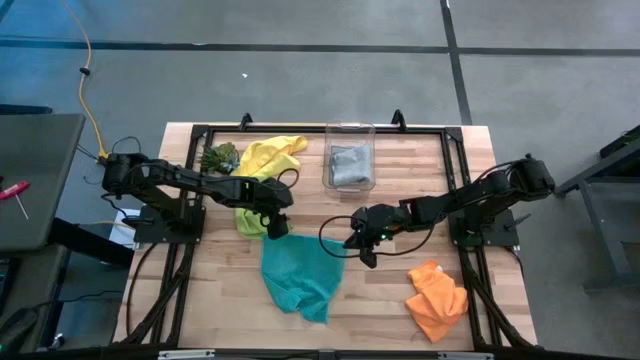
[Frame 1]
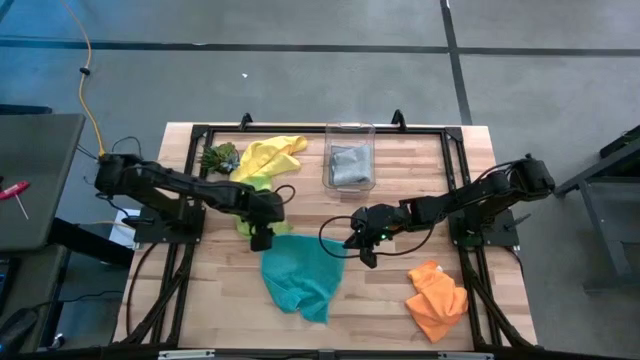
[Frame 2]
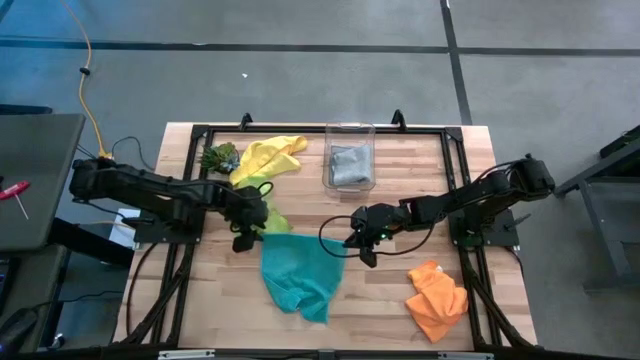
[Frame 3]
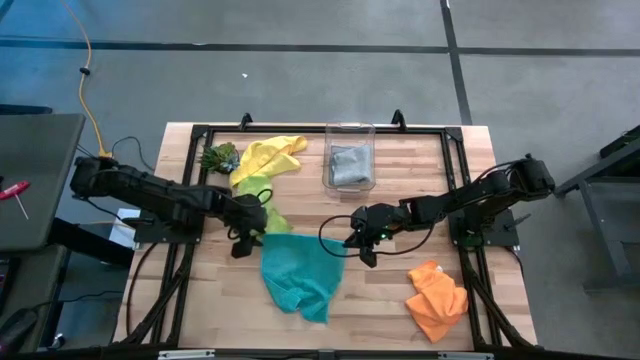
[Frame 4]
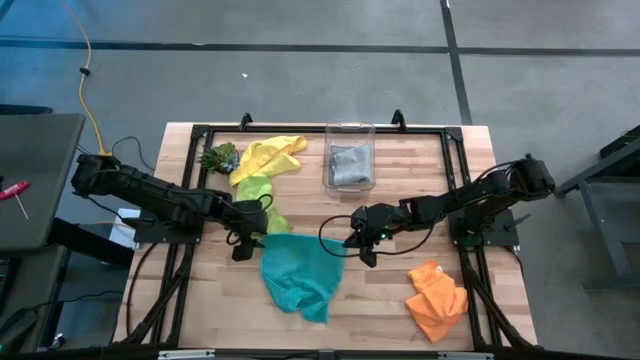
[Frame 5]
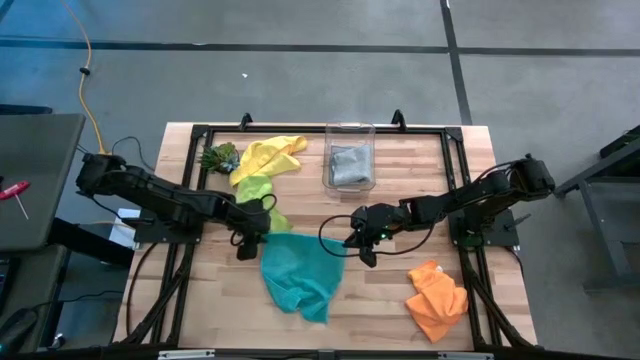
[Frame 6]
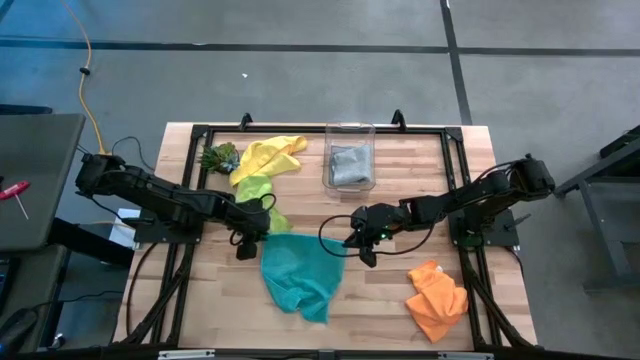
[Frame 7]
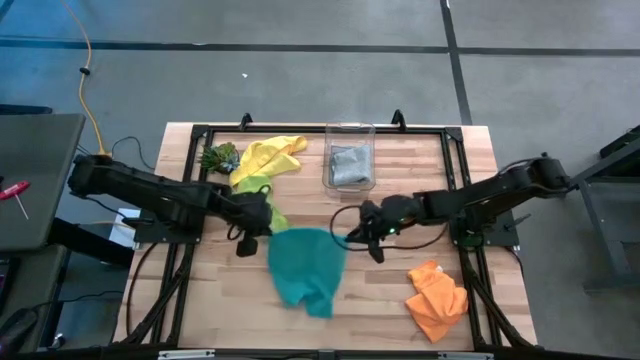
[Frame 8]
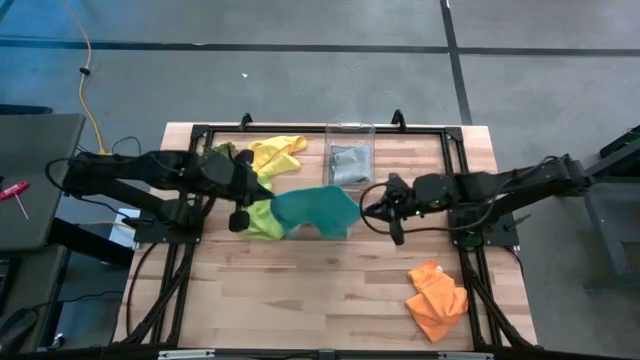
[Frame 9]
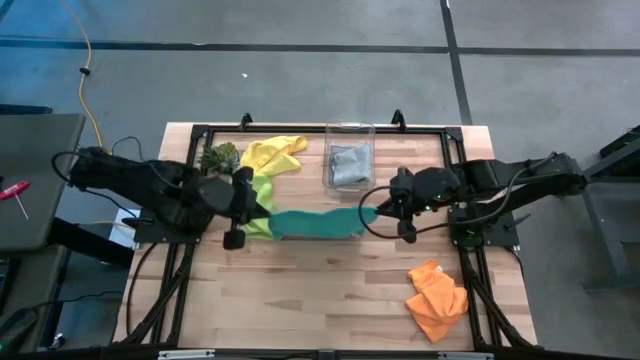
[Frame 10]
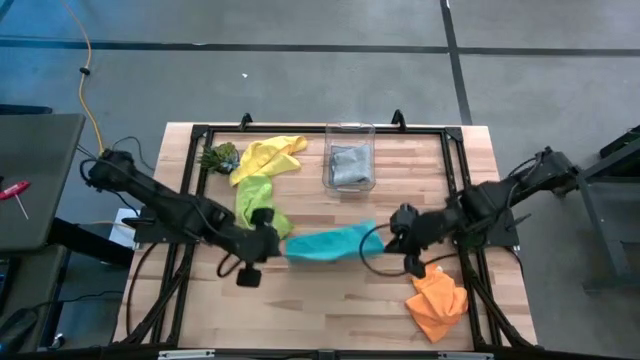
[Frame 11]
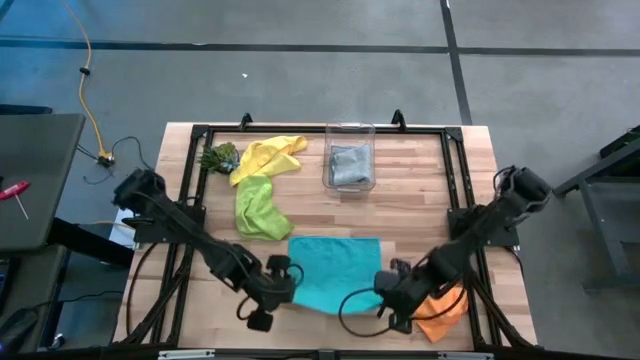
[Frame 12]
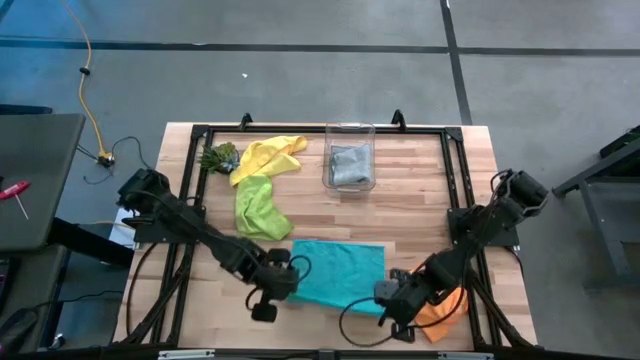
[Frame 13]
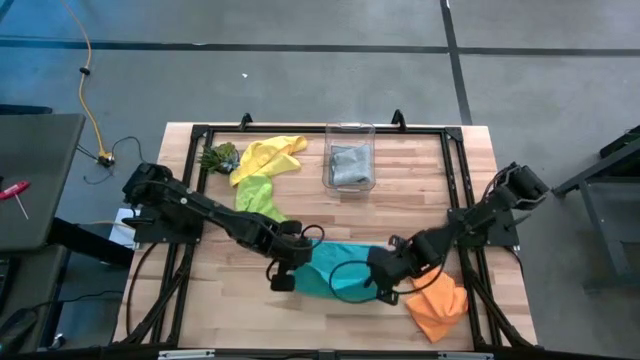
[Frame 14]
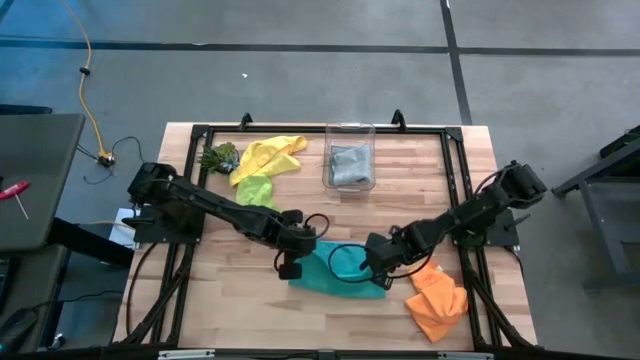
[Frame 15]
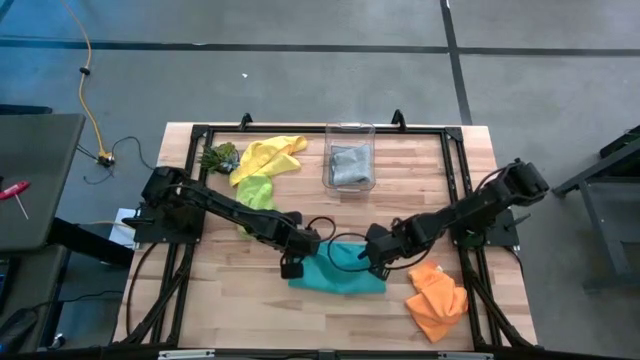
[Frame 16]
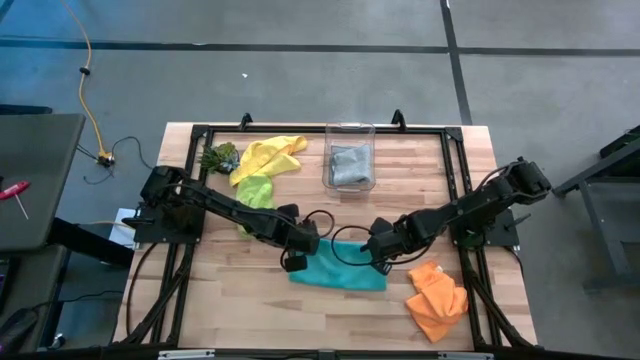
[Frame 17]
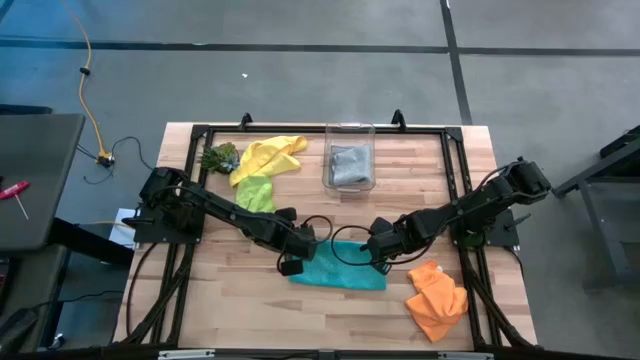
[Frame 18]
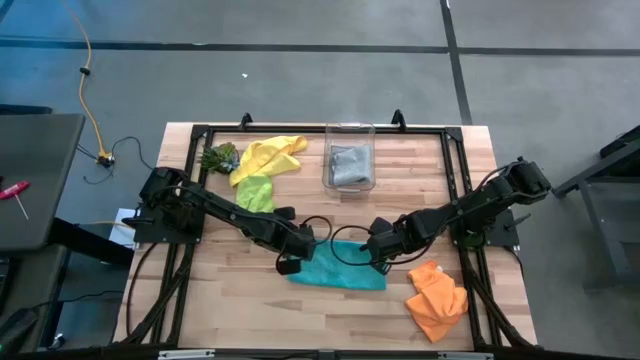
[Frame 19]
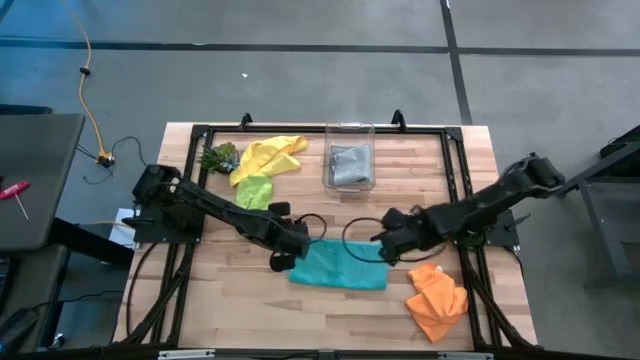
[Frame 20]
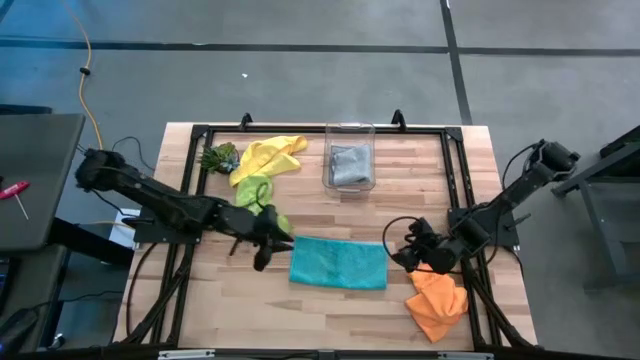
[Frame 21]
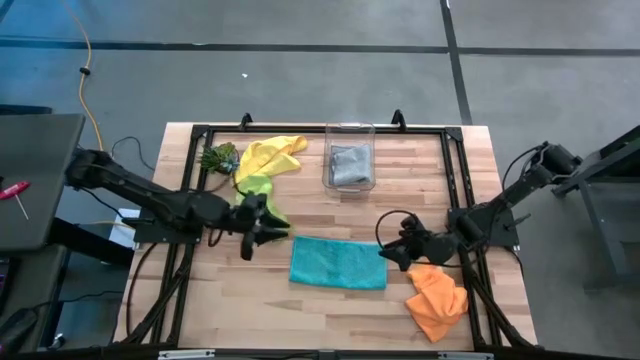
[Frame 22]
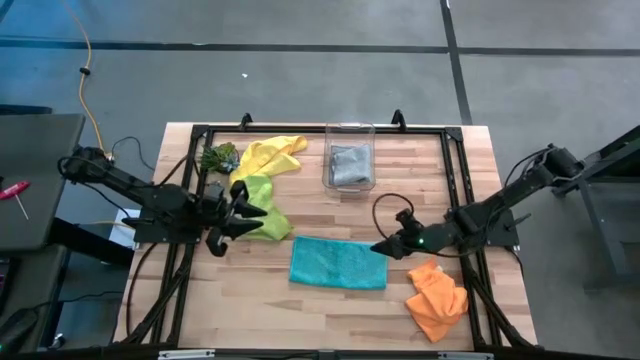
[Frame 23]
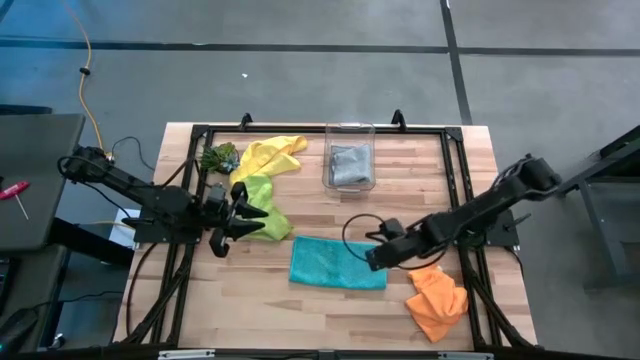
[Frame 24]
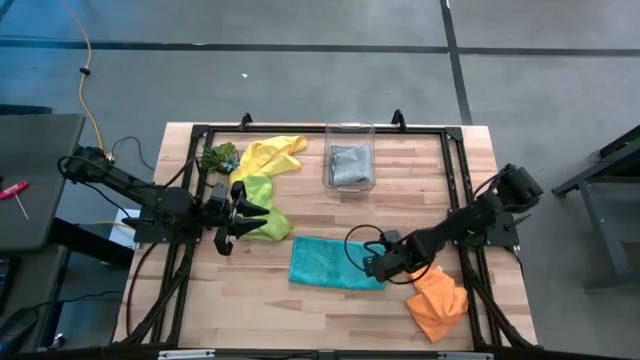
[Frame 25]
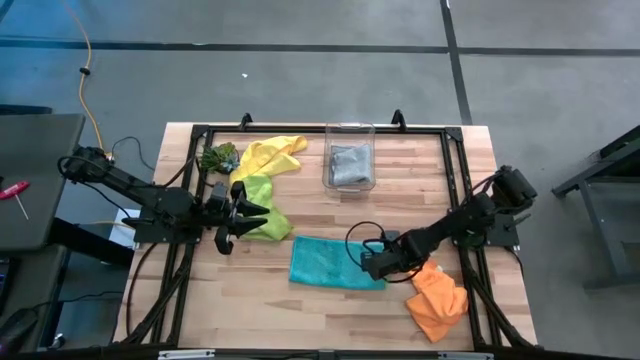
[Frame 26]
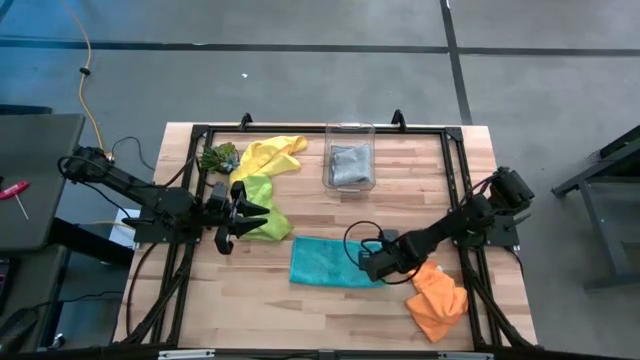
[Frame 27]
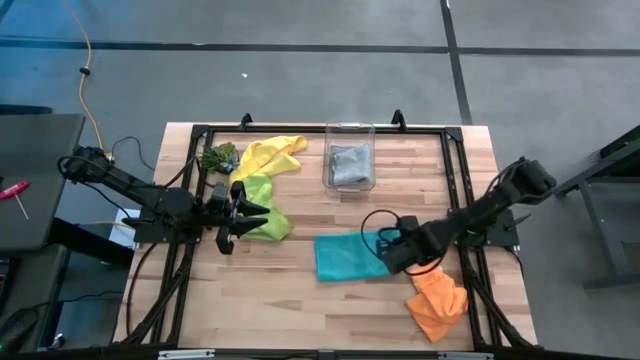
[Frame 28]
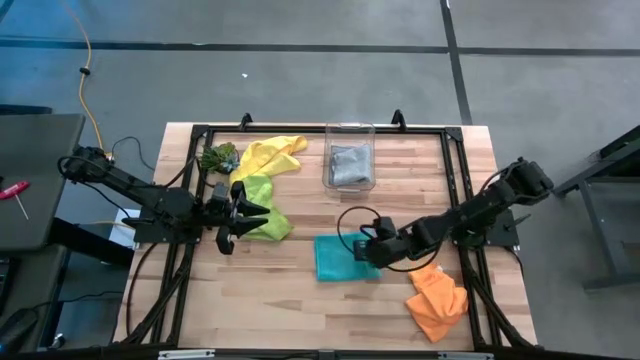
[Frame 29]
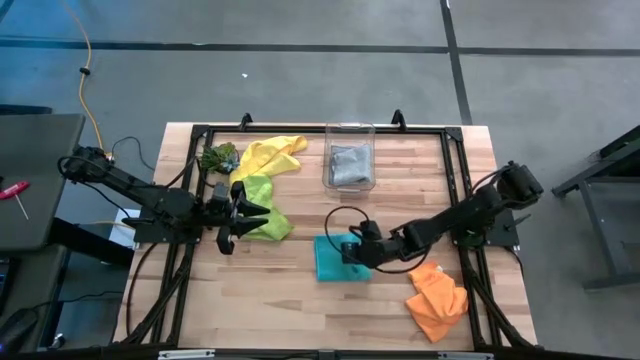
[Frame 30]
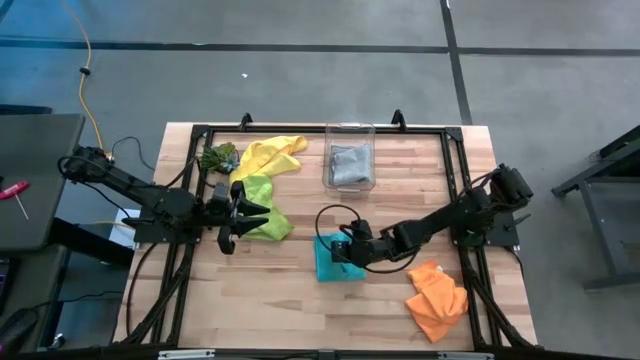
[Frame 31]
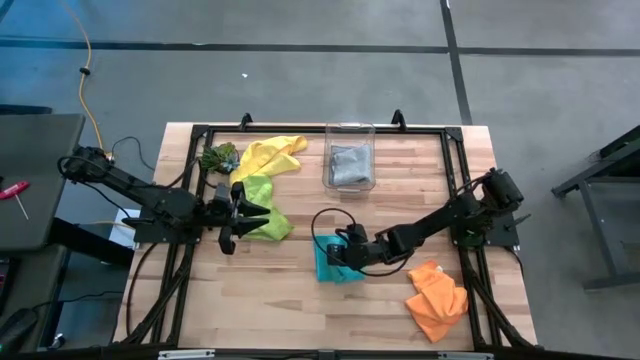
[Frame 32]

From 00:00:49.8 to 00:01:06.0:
Task: Fold microfiber towels
Fold the blue microfiber cloth

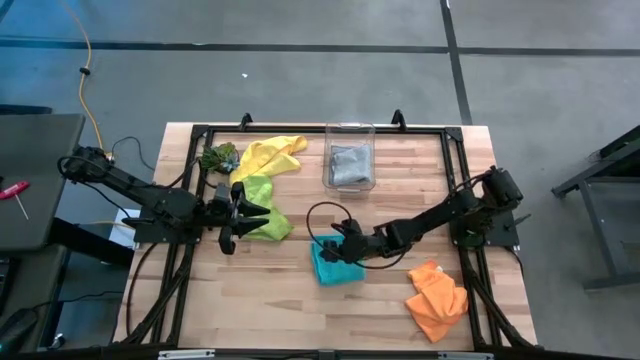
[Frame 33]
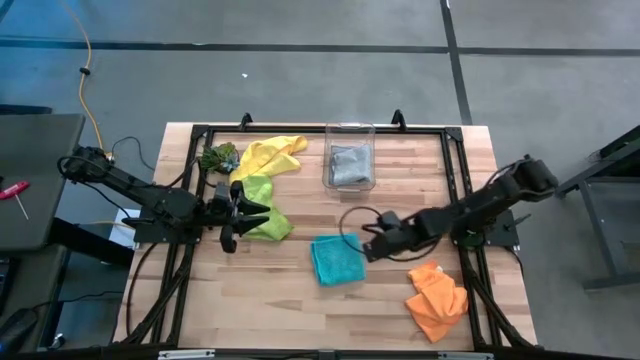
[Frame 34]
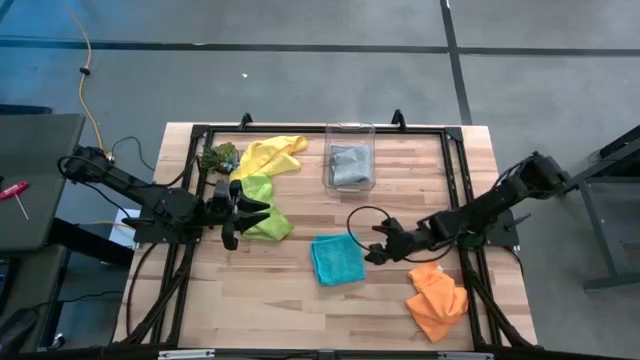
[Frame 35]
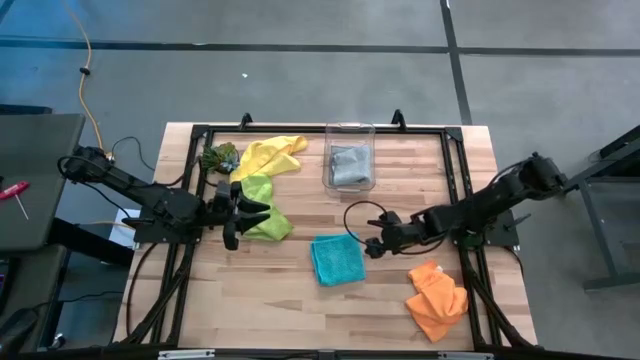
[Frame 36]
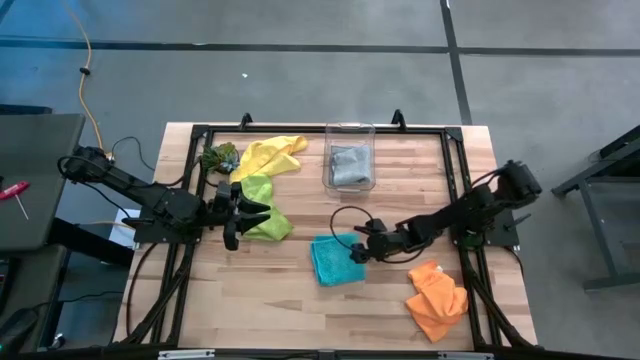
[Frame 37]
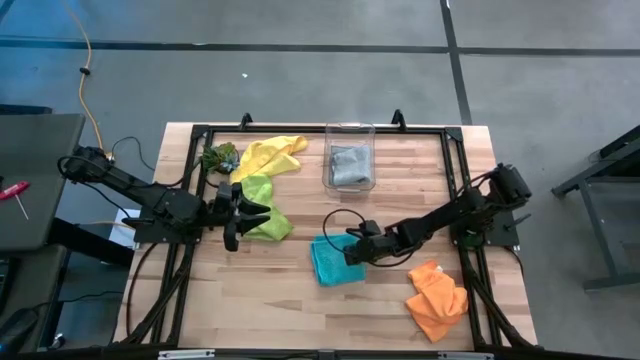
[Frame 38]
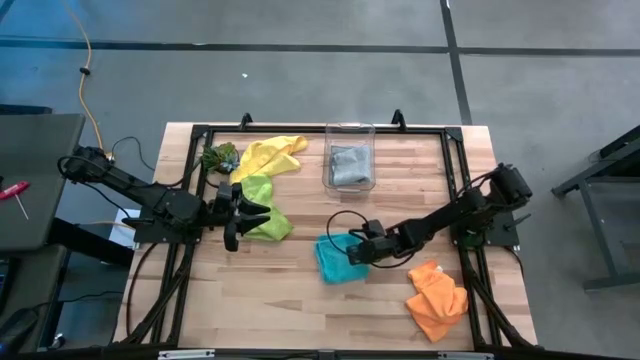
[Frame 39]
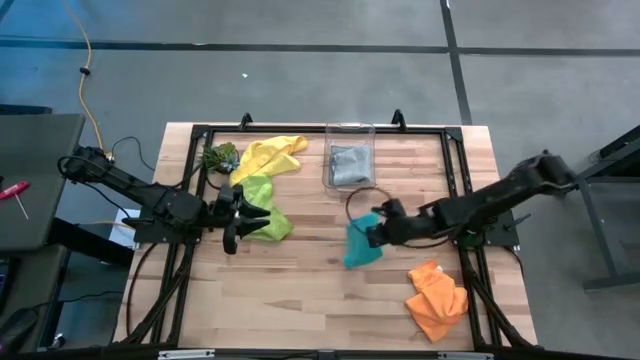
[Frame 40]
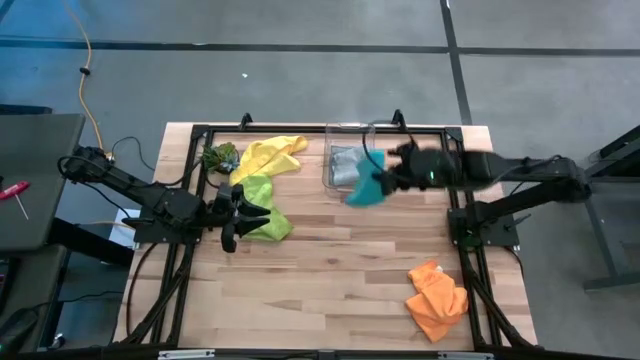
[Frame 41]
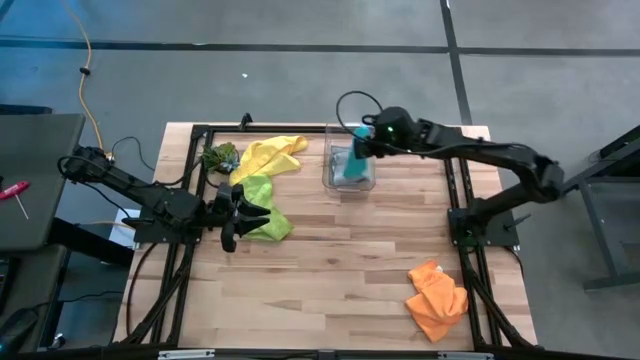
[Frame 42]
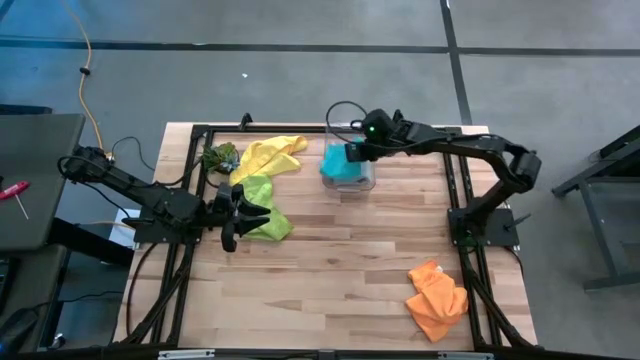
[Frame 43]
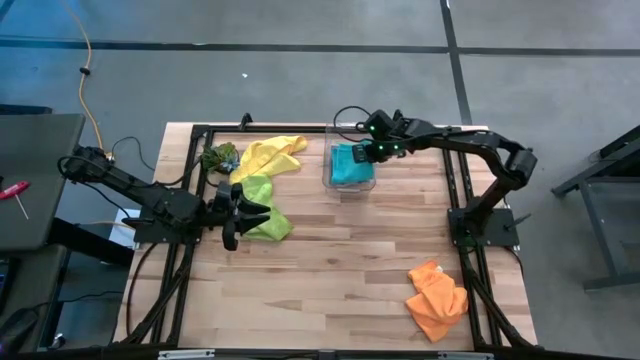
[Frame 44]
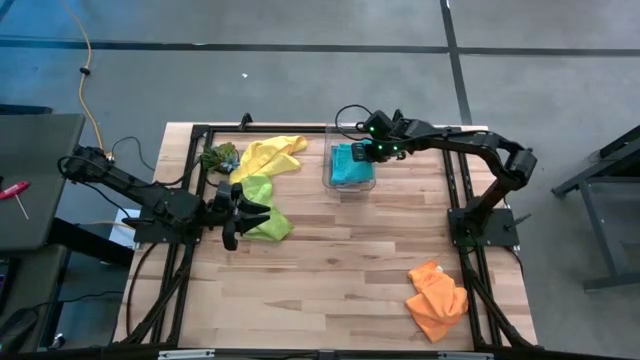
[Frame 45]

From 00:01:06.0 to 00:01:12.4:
Put the blue microfiber cloth into the transparent bin
